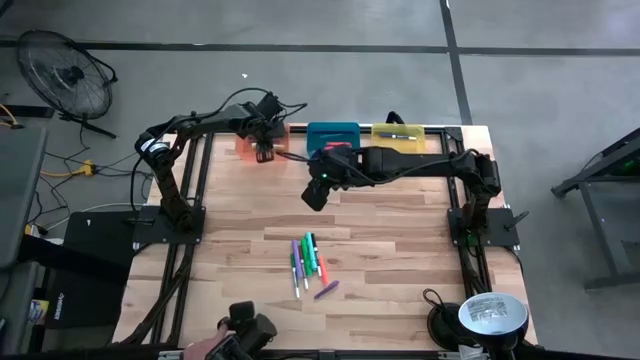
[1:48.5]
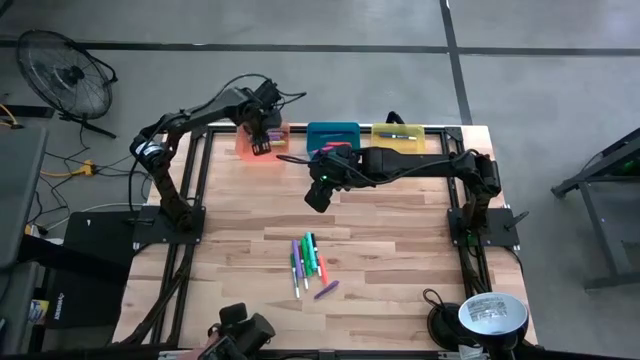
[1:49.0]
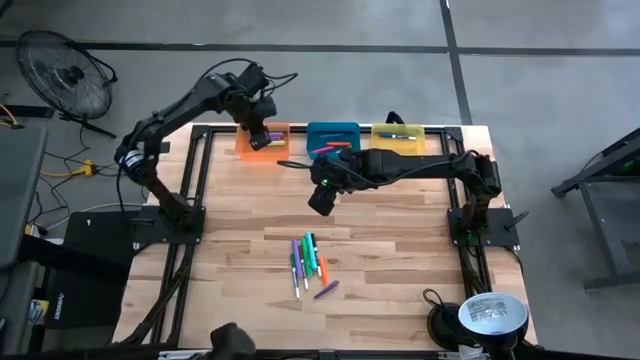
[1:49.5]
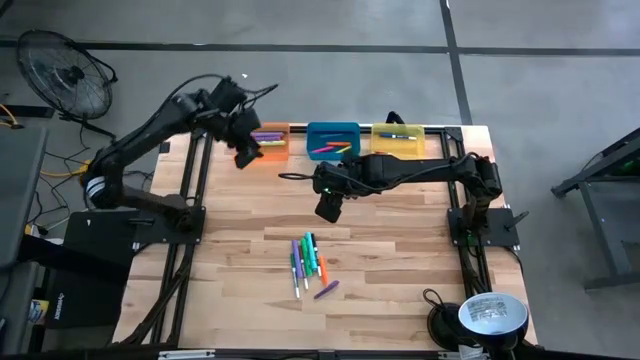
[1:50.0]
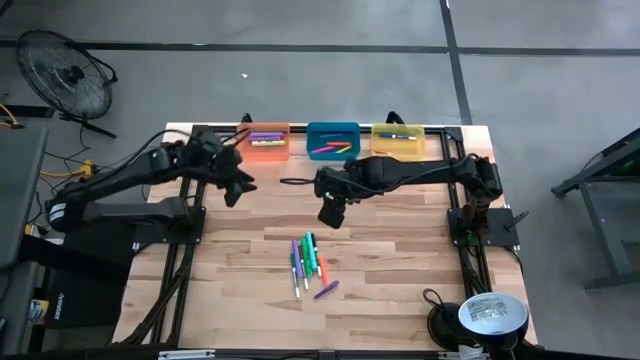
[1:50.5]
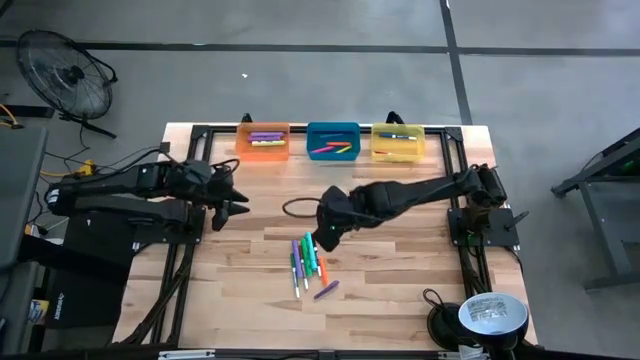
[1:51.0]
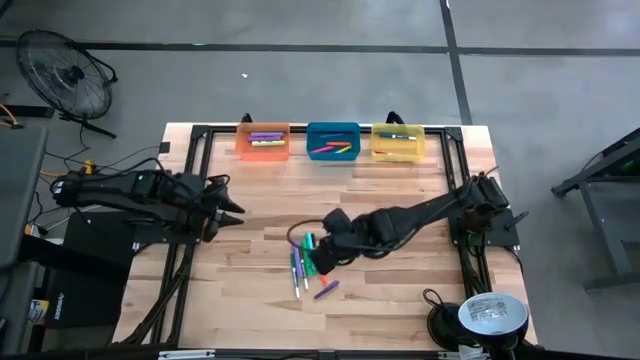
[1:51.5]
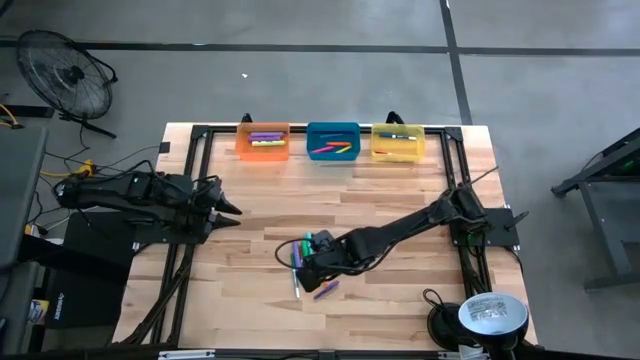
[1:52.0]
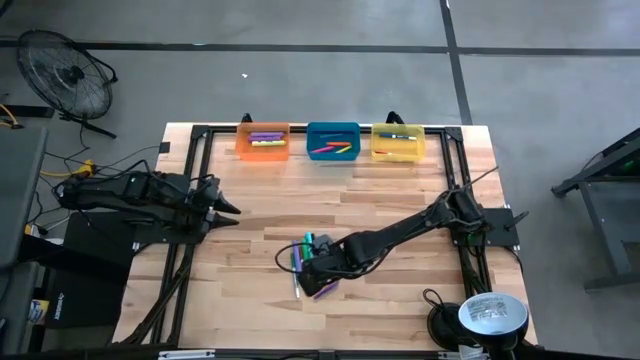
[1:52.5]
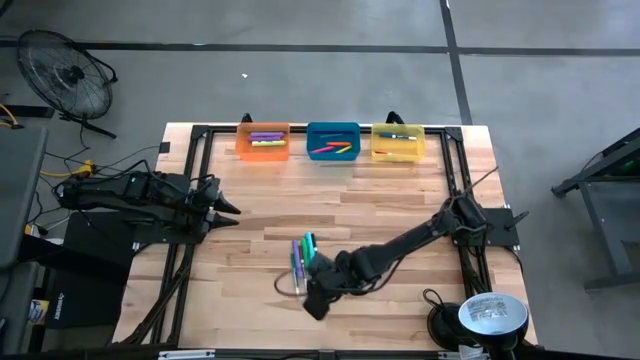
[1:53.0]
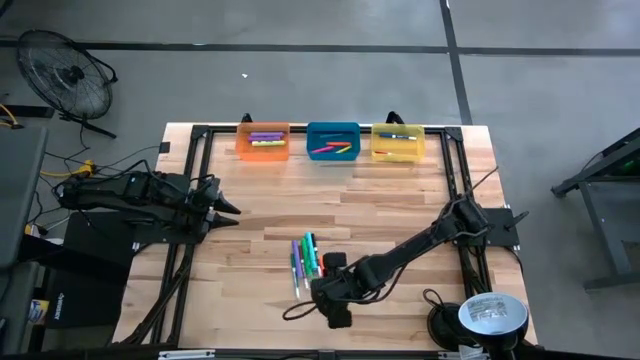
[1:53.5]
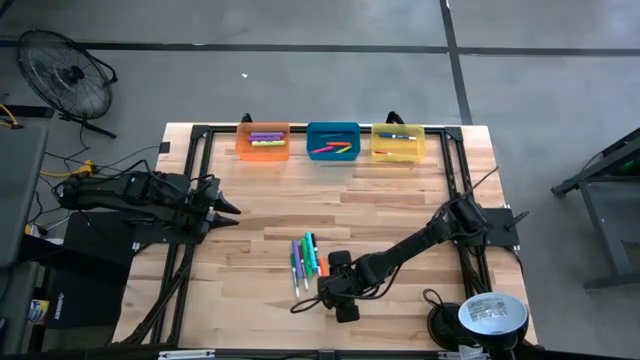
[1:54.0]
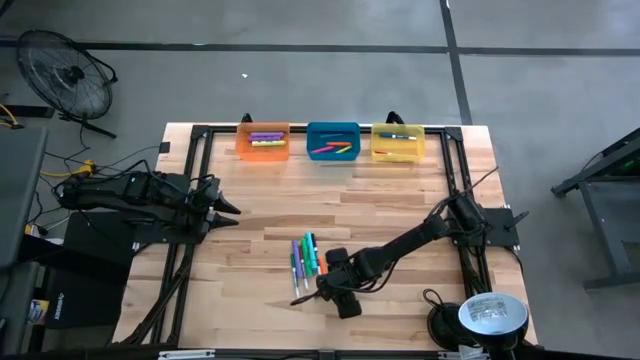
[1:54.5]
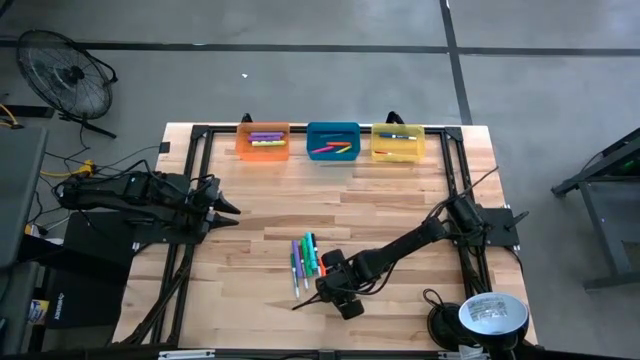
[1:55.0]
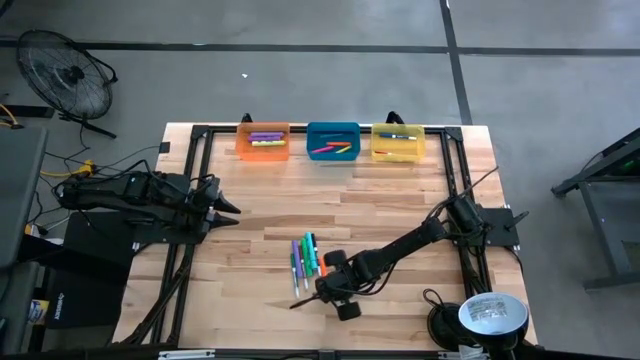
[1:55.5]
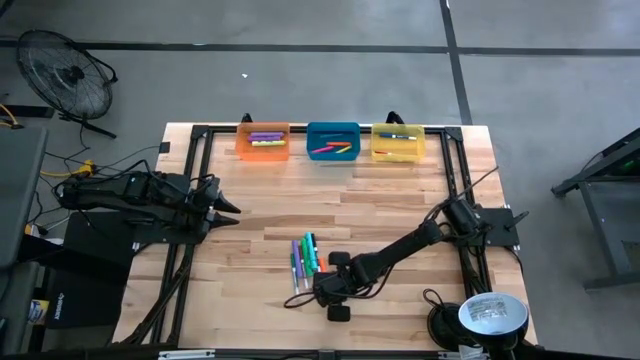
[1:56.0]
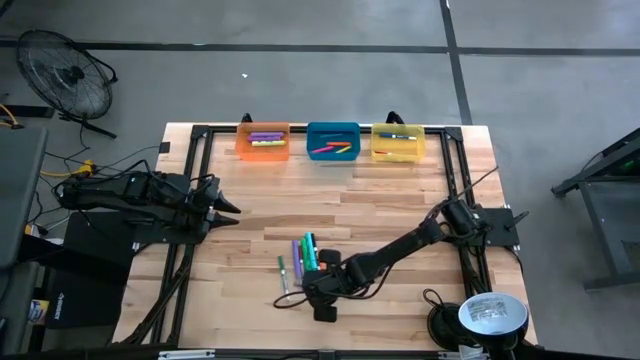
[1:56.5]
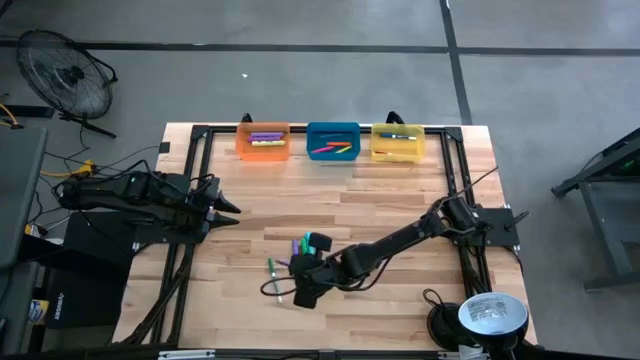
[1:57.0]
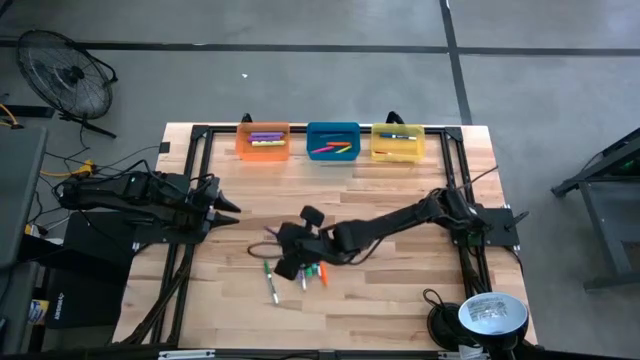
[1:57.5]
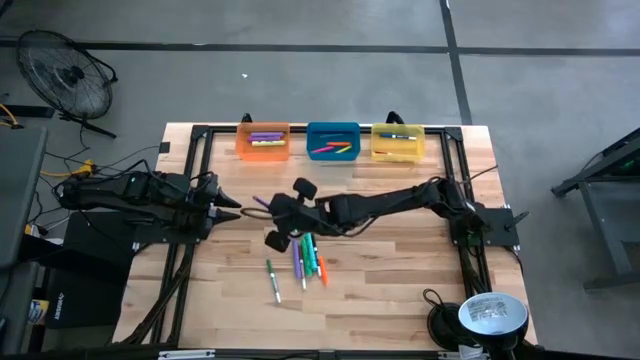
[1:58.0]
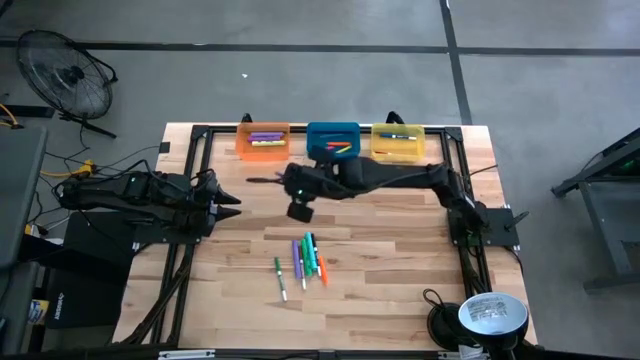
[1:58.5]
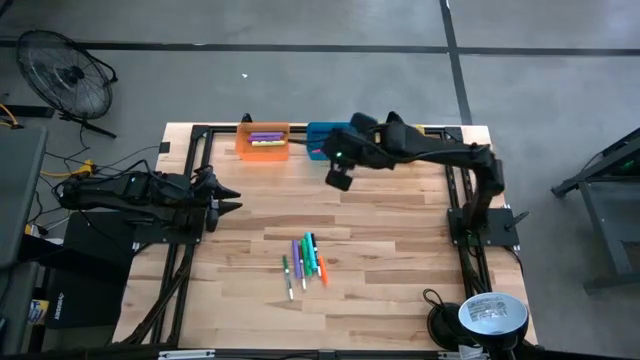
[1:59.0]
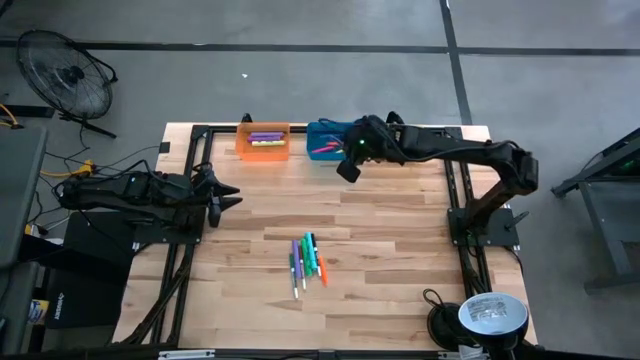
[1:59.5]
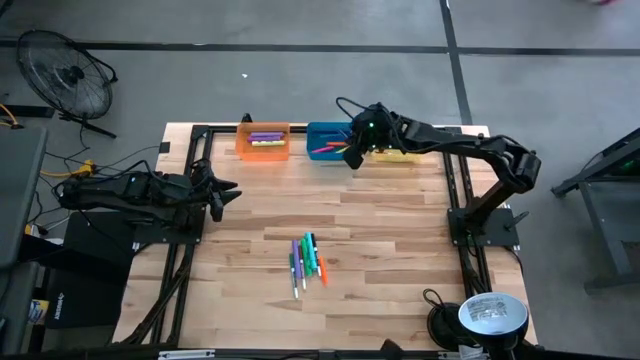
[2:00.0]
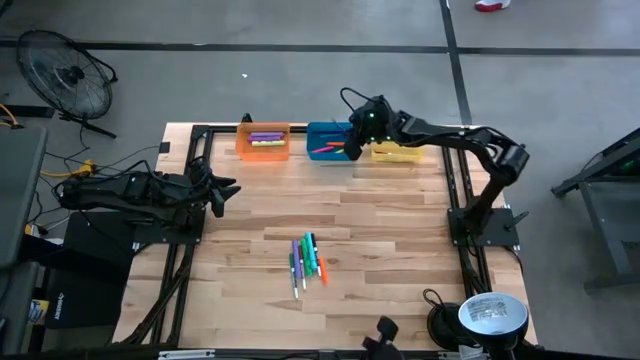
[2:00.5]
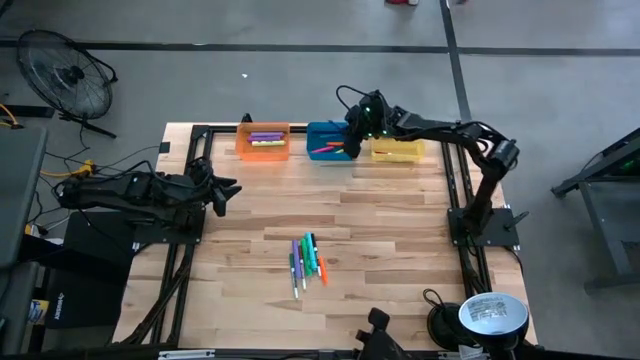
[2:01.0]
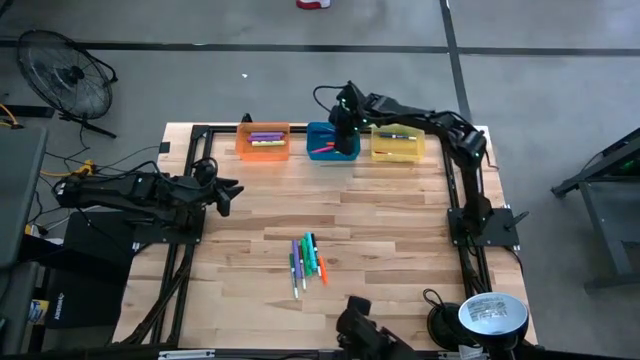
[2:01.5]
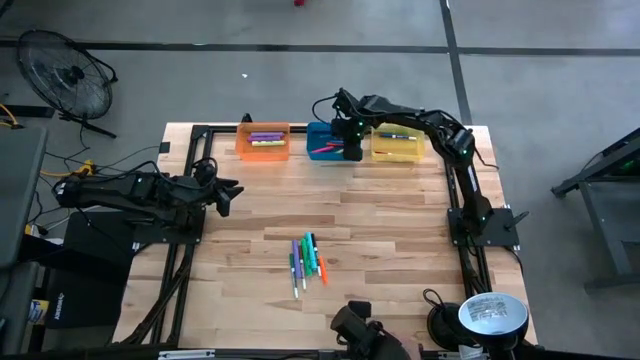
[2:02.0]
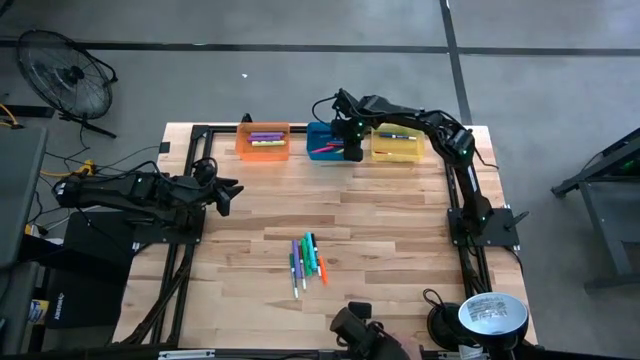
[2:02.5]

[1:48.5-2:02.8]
Task: Pick & Place Markers
Put the violet pen into the blue bin

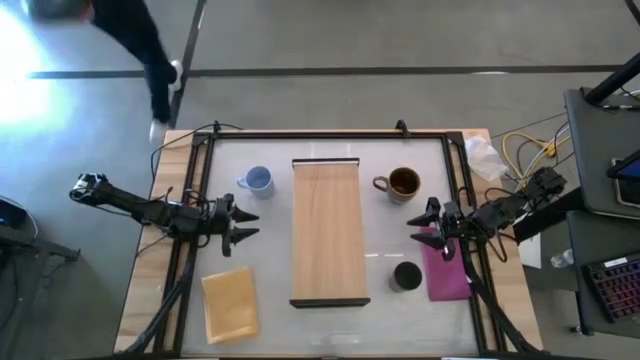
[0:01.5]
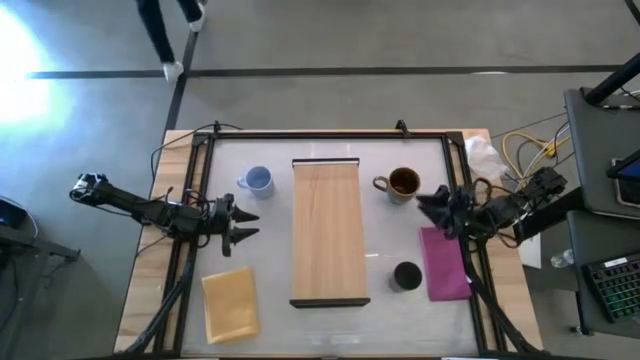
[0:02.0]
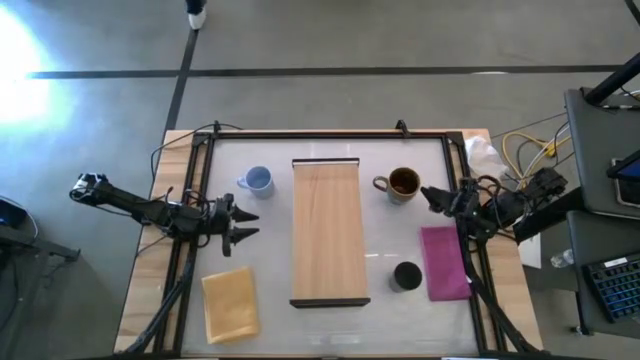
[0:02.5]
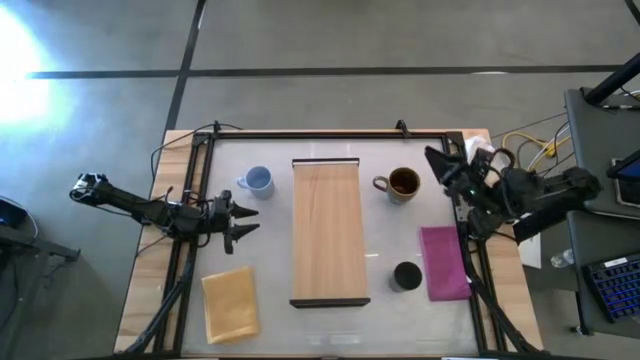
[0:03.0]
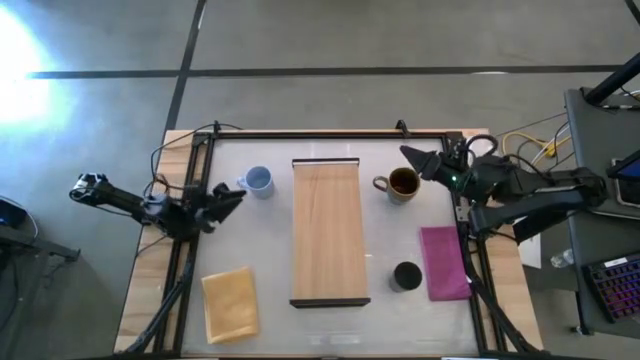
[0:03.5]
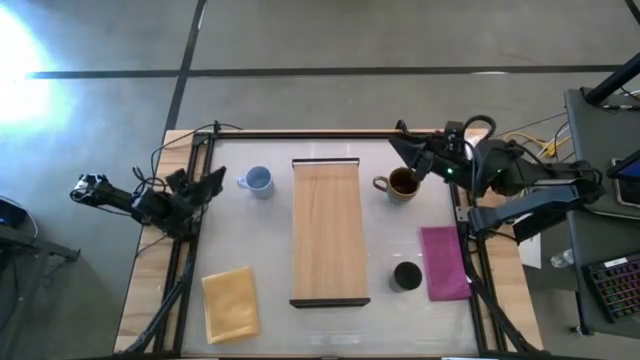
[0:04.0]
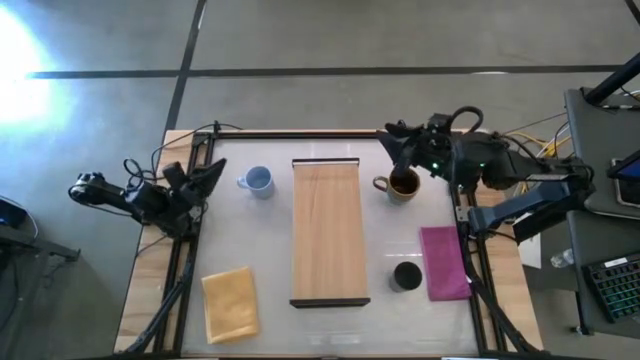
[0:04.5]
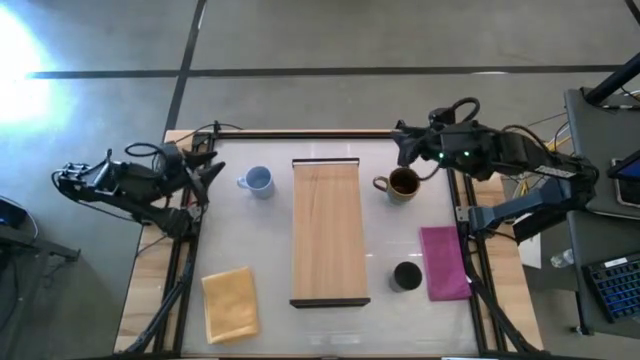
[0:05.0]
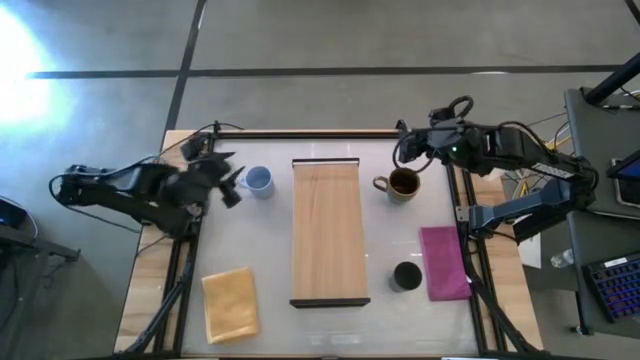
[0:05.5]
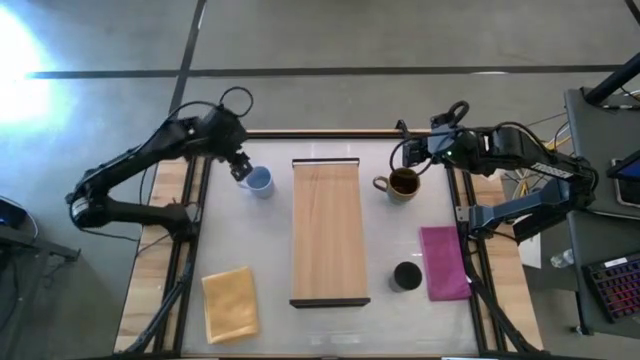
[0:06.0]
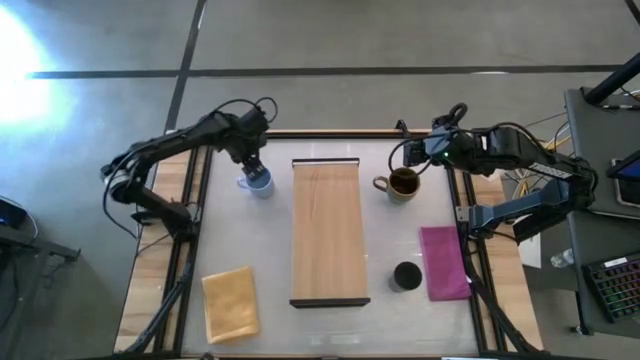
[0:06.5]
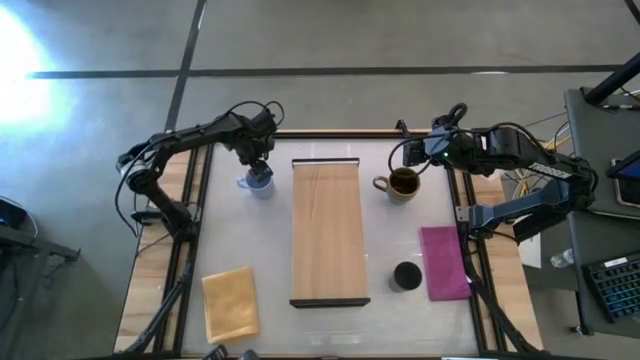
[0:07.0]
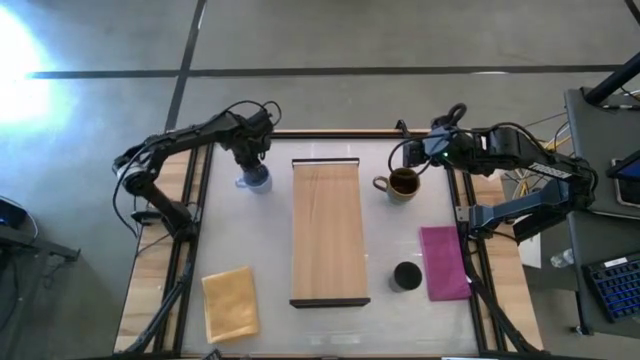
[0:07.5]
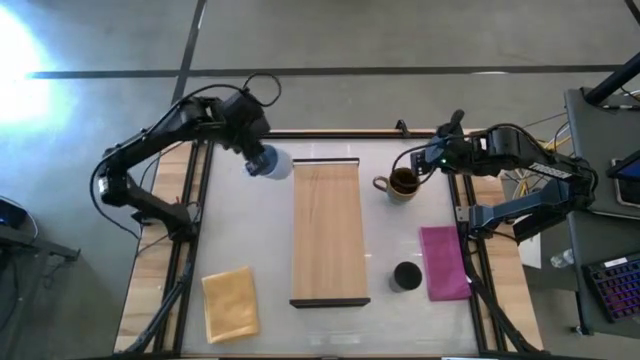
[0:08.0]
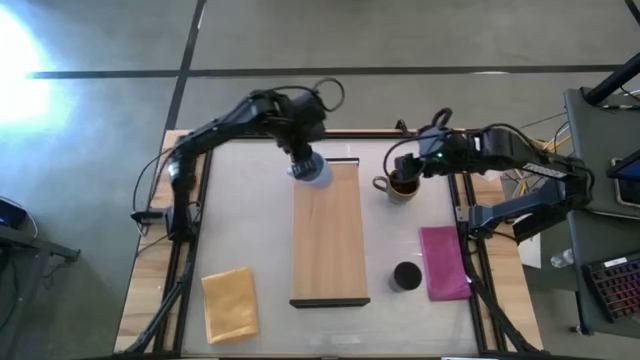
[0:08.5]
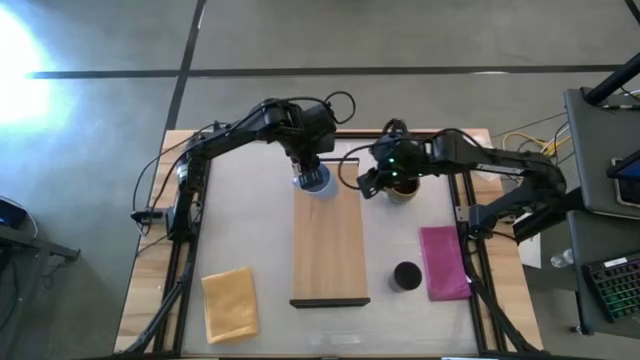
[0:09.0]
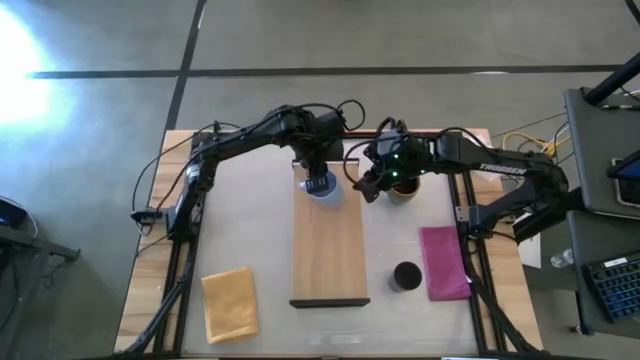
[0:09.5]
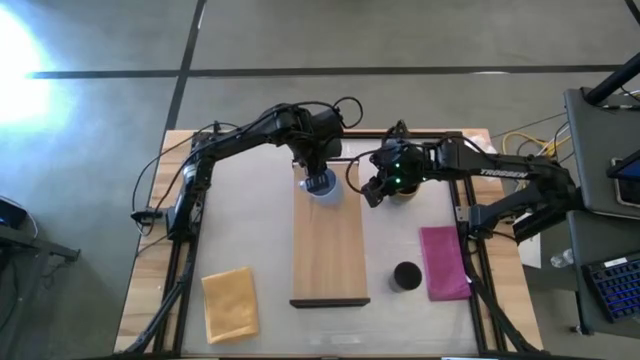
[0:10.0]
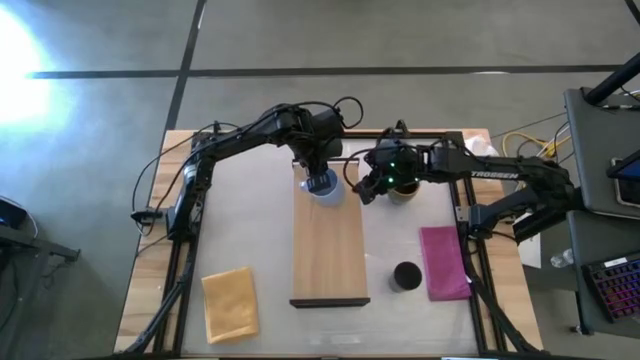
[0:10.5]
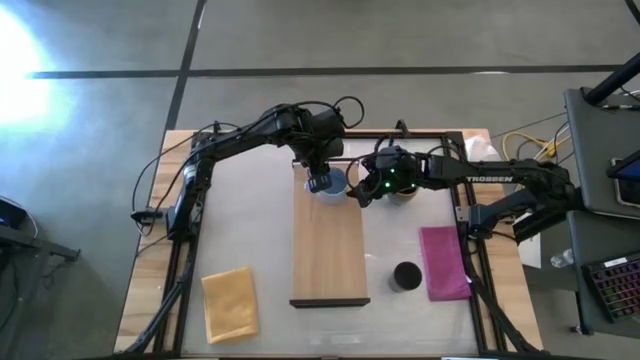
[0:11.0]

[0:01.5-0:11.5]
Task: Stack small to large cups/mugs on shelf
Put the blue mug on the shelf
